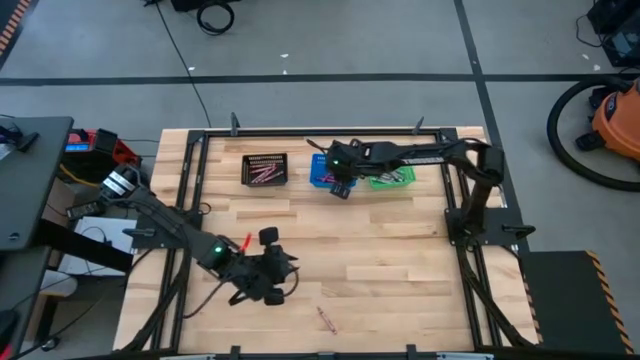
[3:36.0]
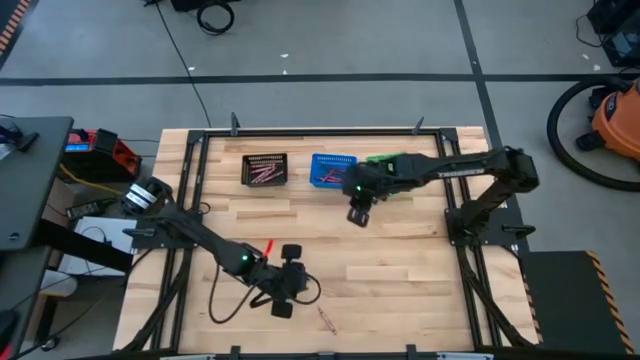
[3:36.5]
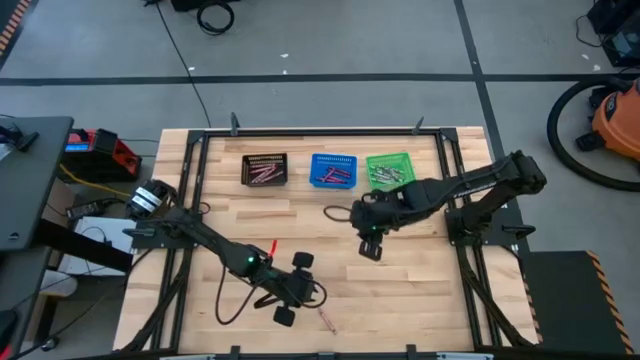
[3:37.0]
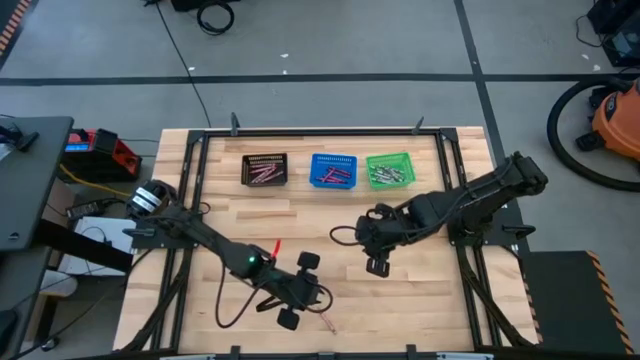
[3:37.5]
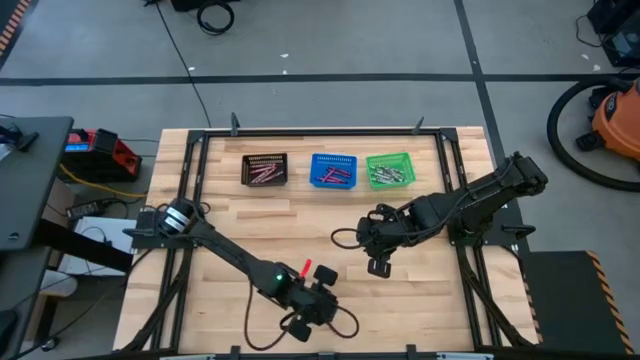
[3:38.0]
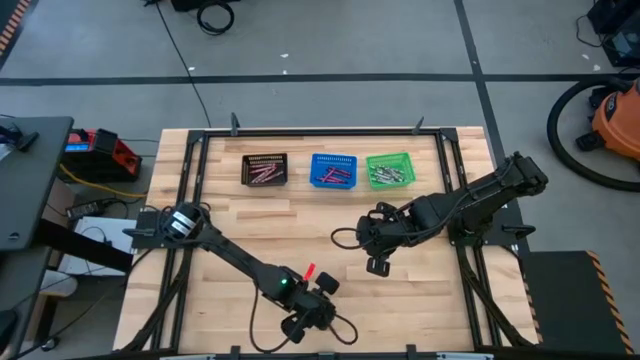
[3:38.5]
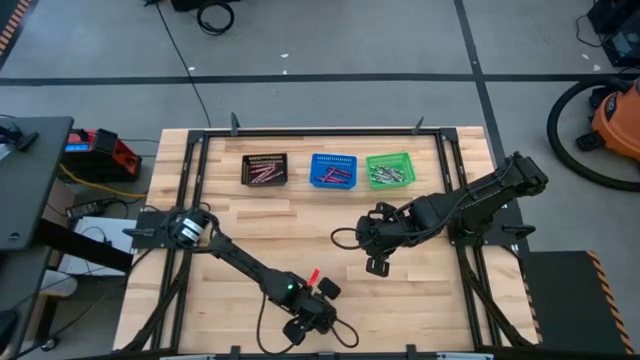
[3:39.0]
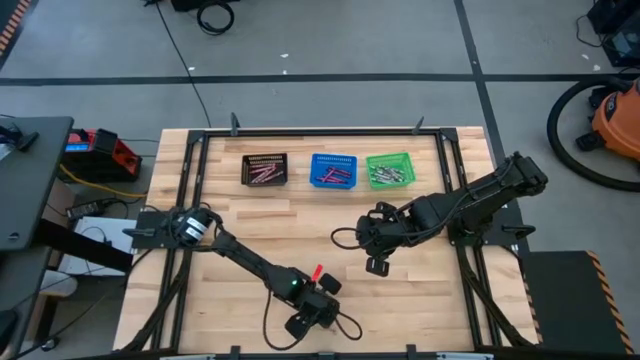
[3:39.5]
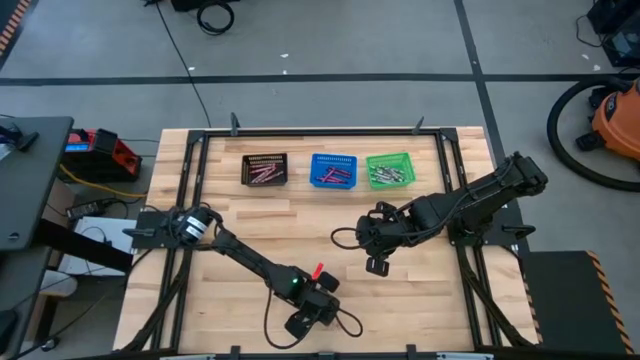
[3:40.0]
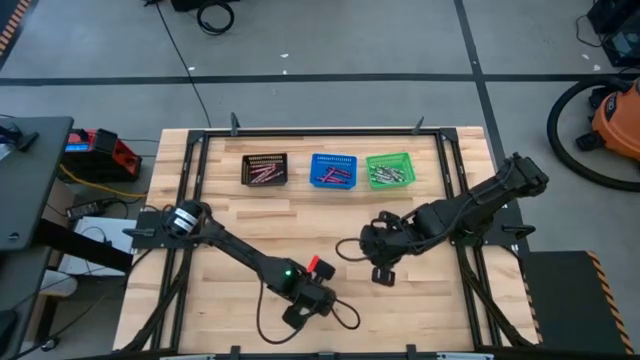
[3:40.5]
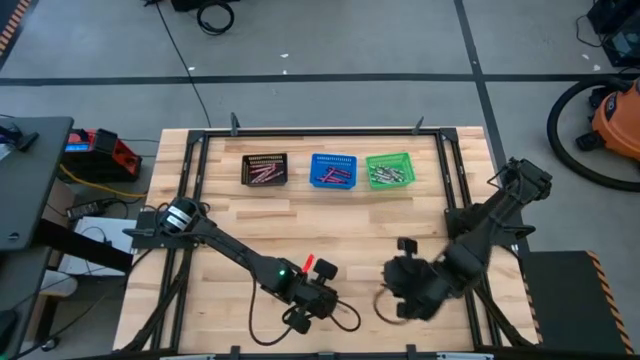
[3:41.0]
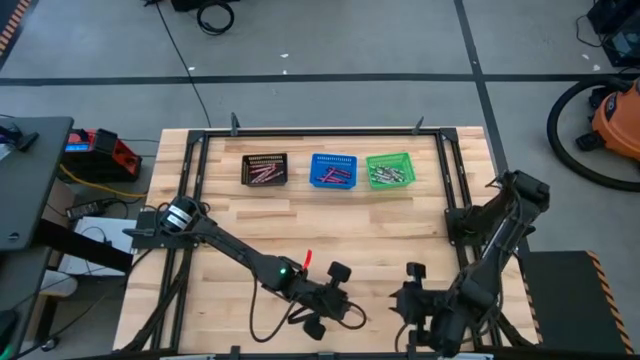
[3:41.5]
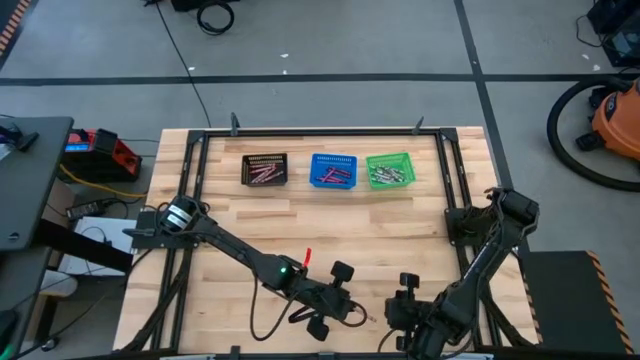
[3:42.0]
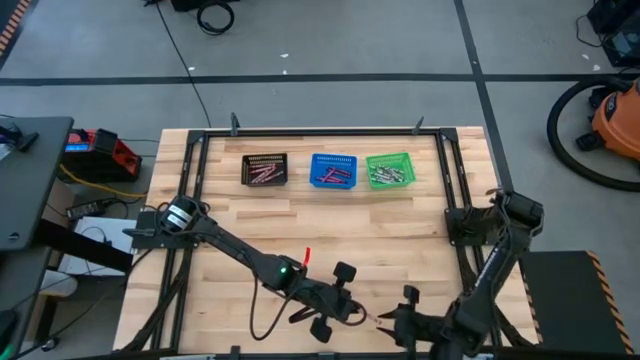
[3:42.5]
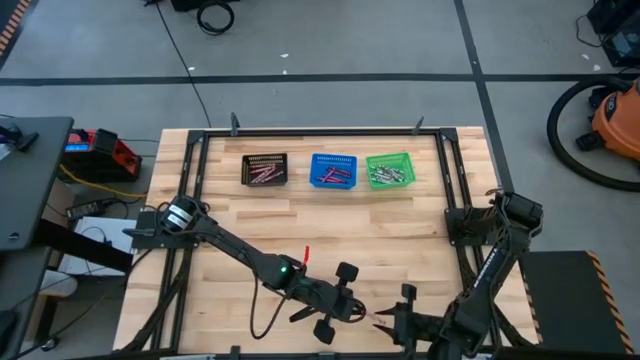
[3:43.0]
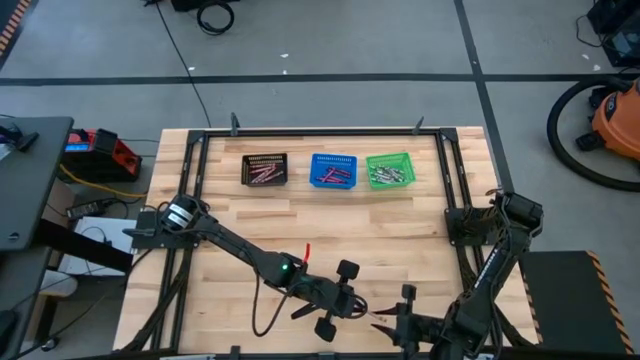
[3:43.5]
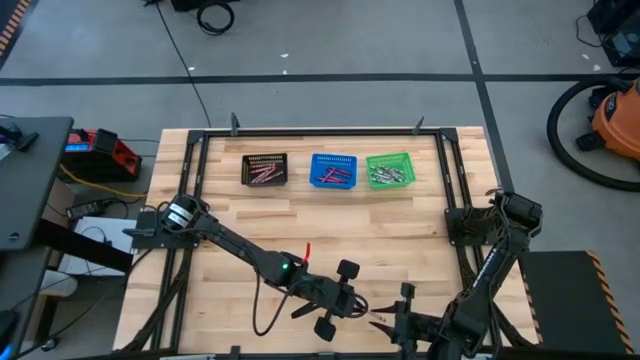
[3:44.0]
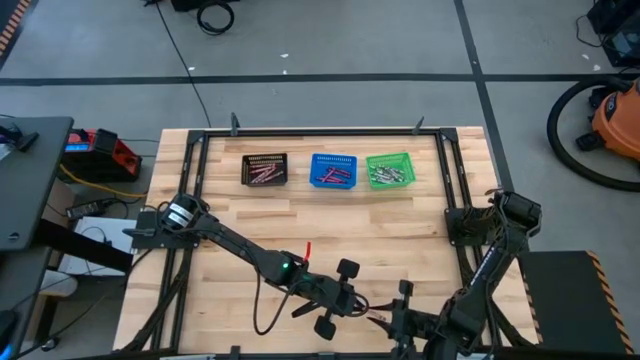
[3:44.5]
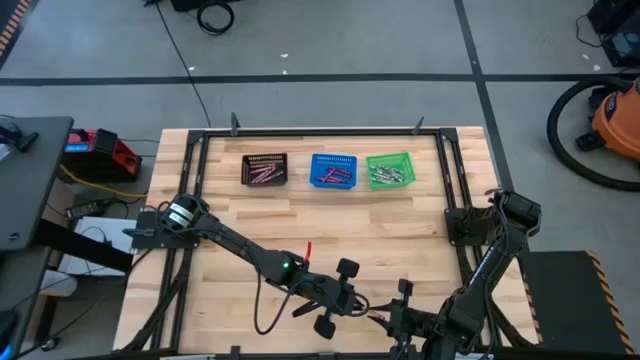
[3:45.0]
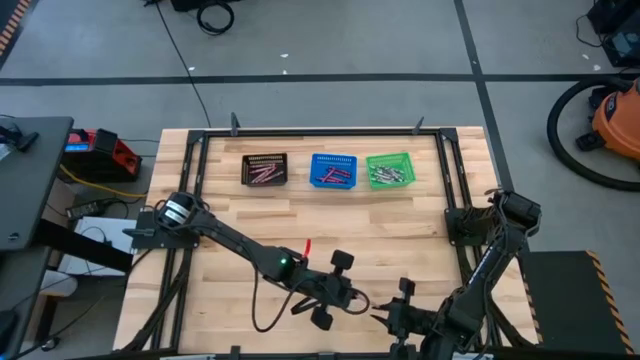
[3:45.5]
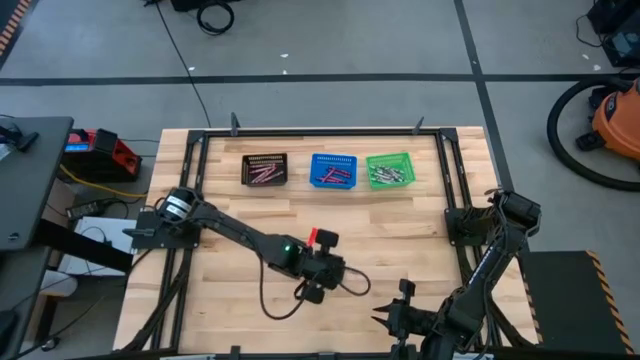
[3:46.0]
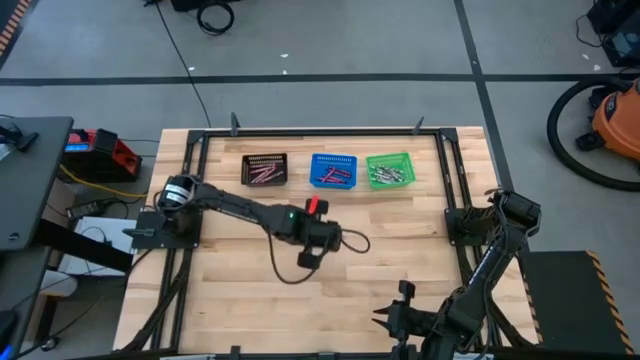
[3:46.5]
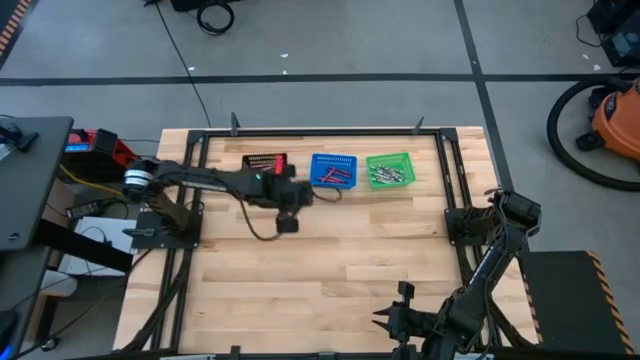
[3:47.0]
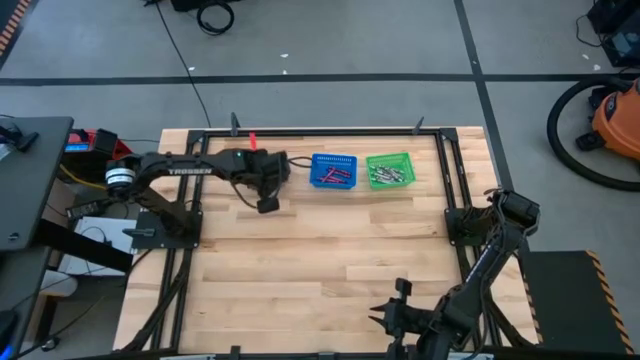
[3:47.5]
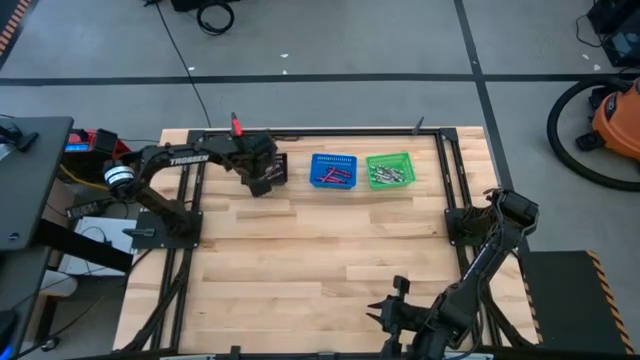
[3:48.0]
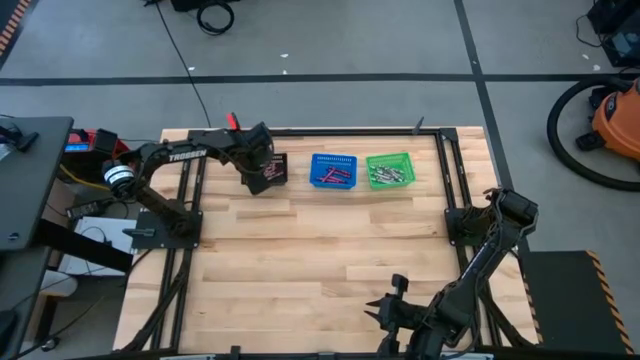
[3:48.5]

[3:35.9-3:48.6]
Task: Sort crayons
Put the pink crayon into the black bin

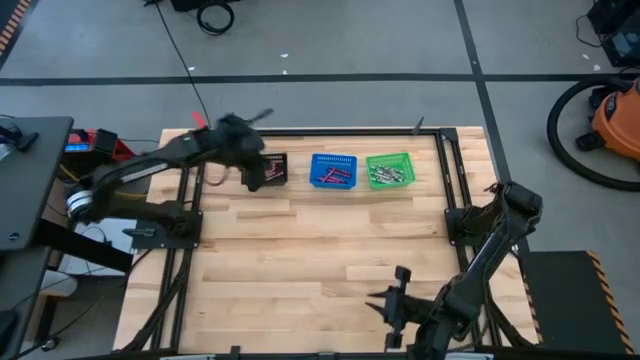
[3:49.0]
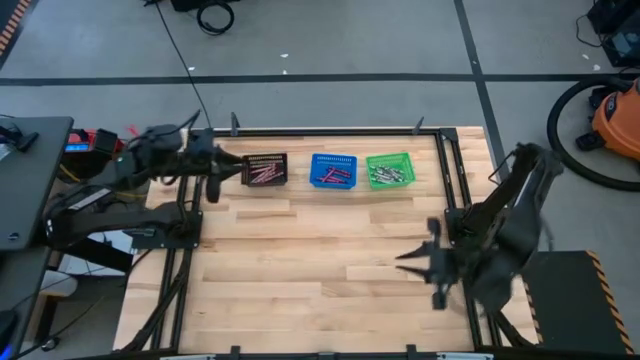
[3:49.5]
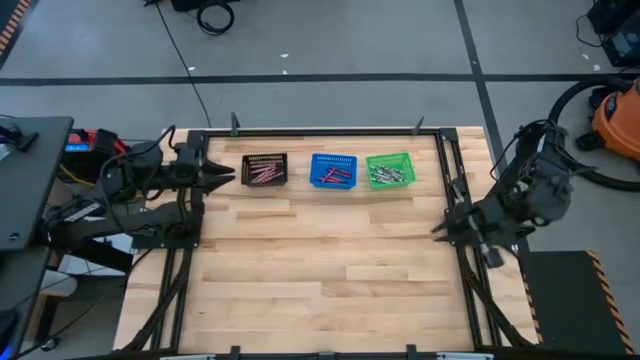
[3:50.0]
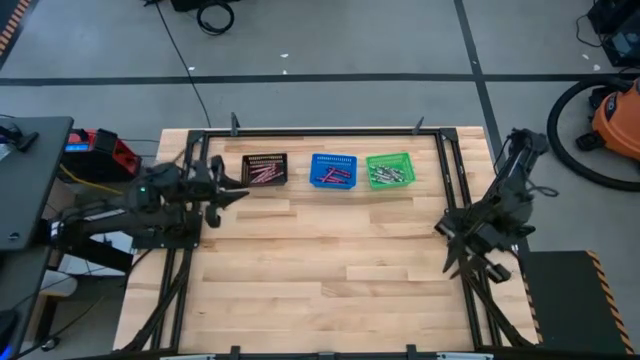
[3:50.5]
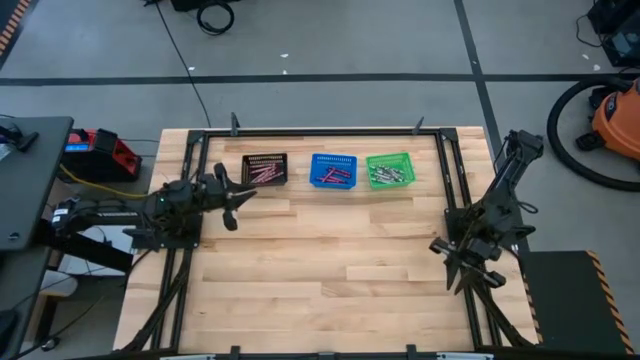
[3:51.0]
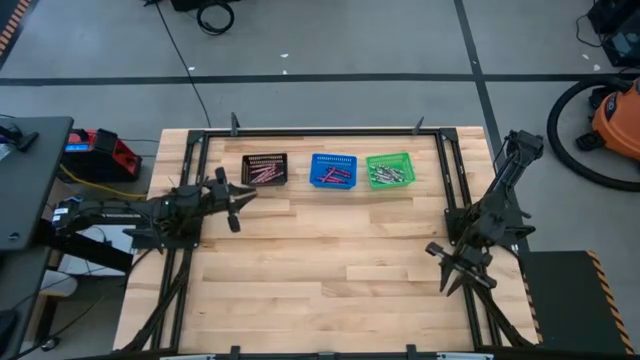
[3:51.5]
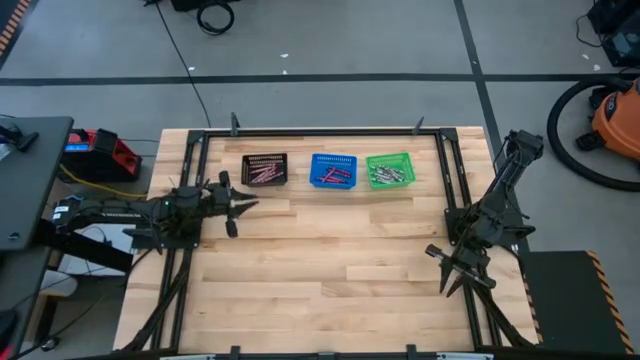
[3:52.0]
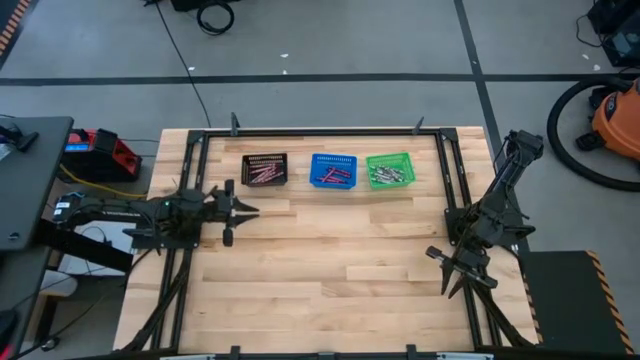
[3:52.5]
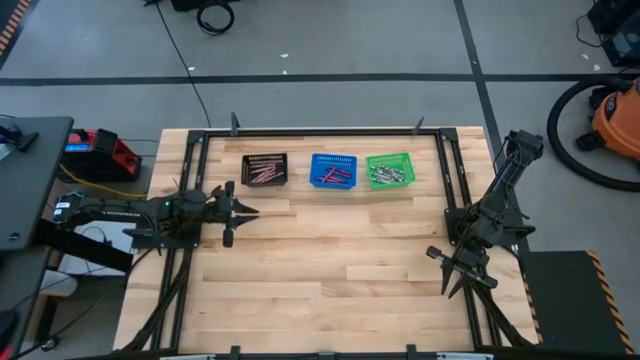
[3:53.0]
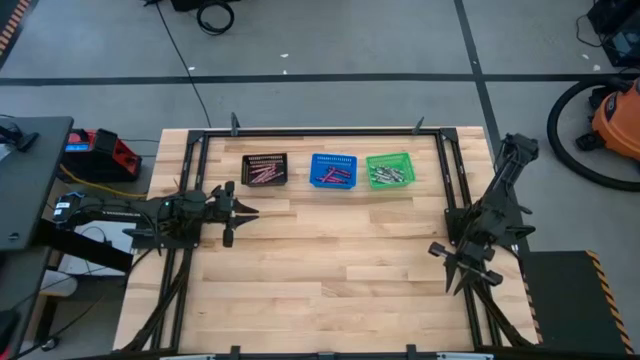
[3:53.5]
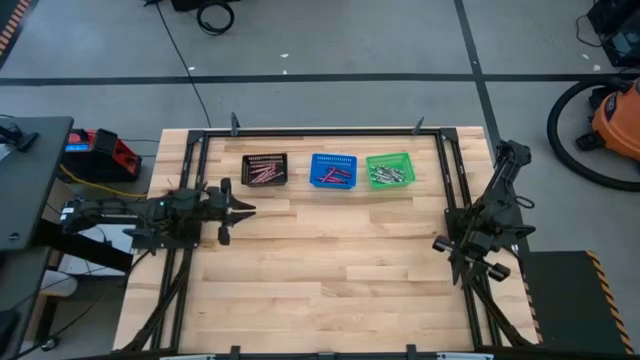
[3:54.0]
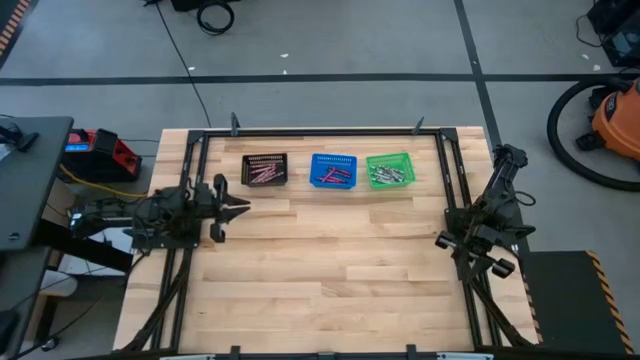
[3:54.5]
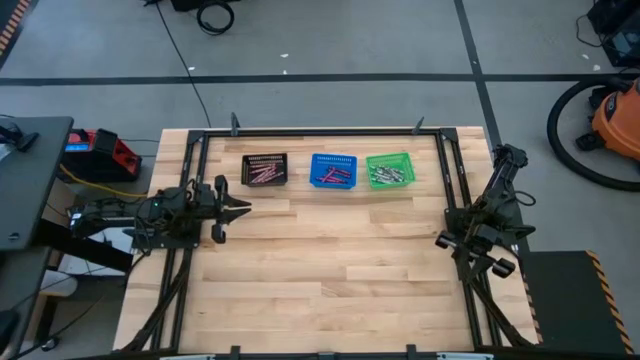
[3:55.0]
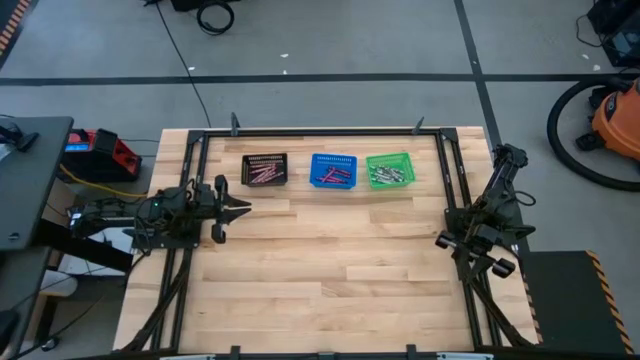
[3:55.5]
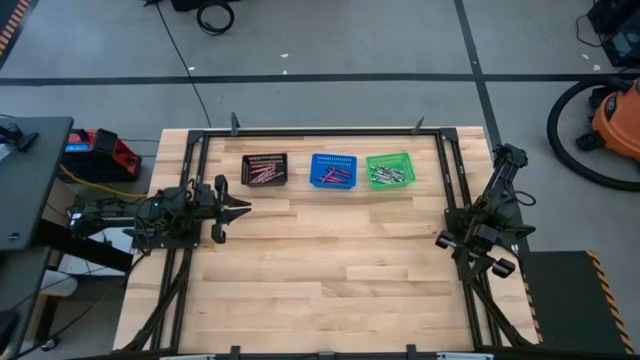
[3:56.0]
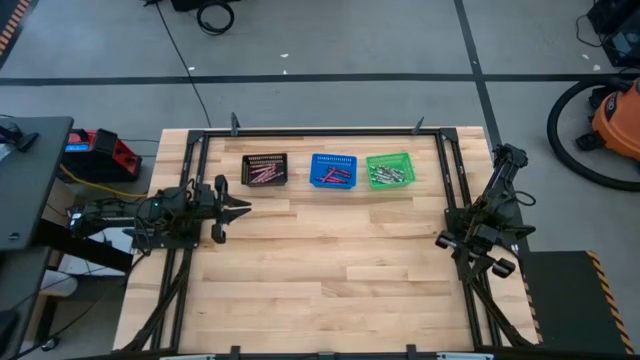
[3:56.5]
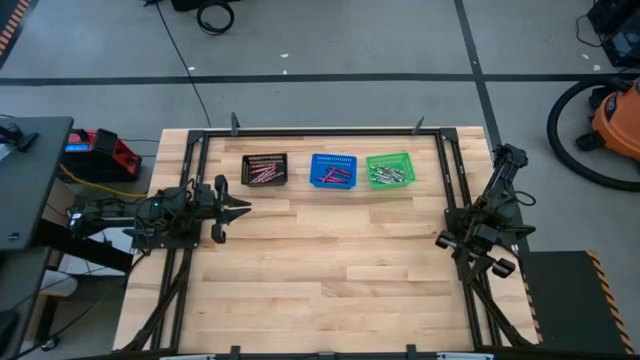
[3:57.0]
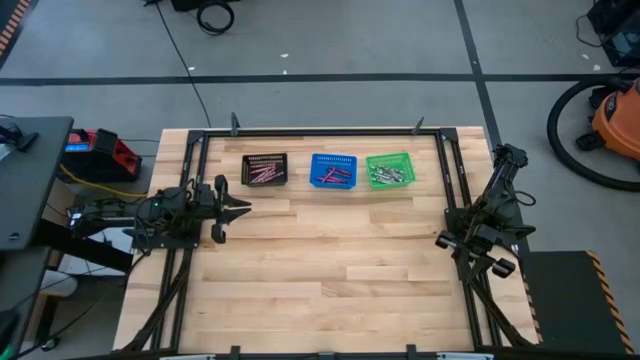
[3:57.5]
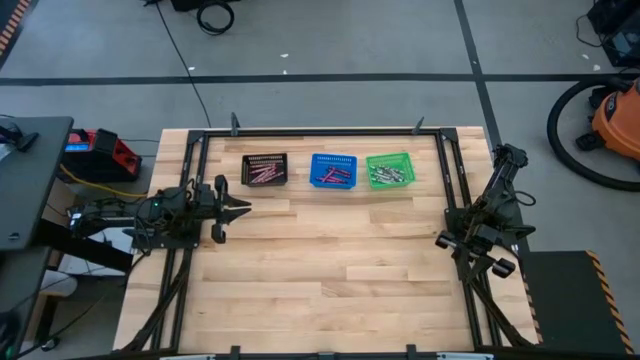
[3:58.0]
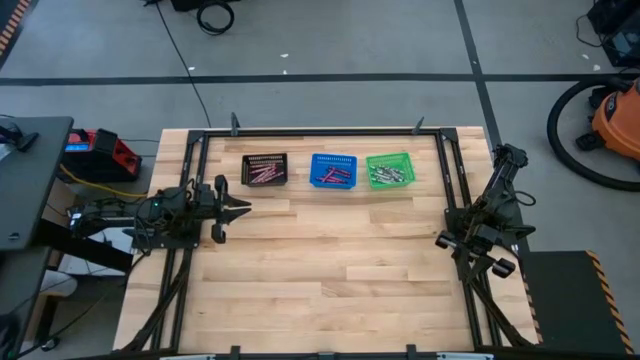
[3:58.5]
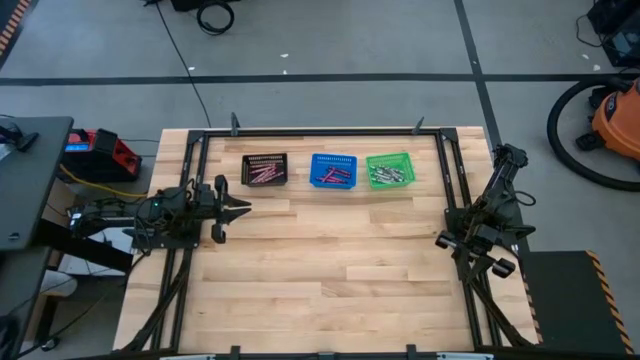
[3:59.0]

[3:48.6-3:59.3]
Return to Home Position
